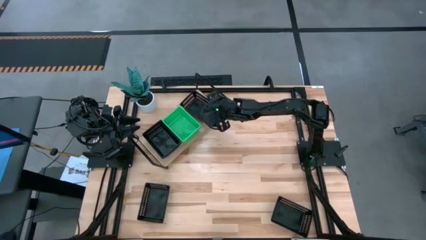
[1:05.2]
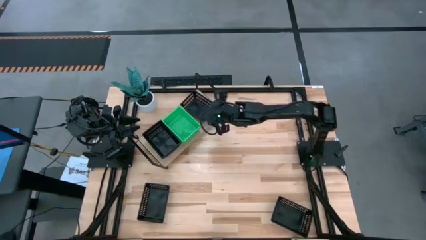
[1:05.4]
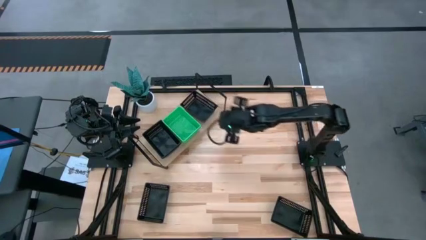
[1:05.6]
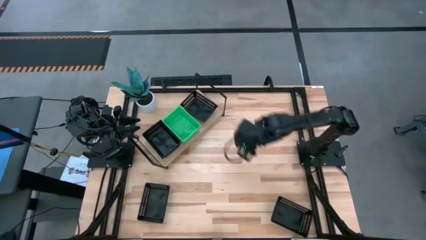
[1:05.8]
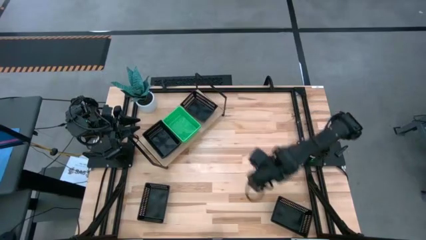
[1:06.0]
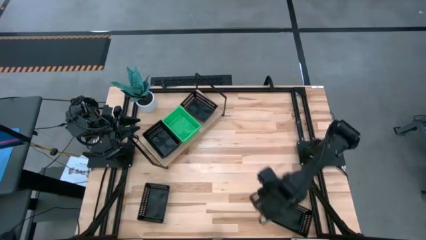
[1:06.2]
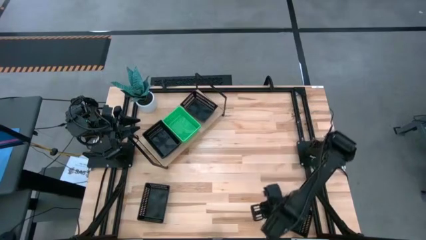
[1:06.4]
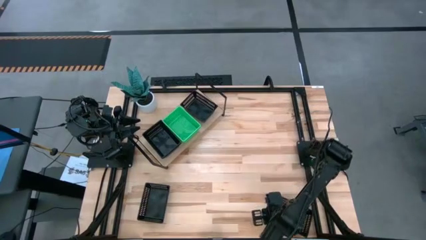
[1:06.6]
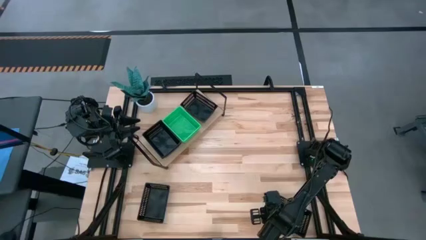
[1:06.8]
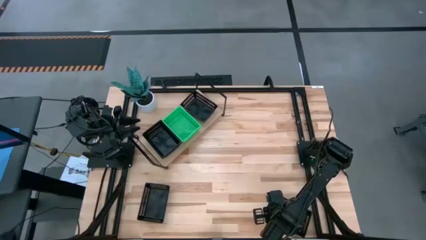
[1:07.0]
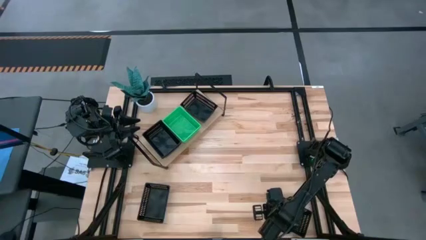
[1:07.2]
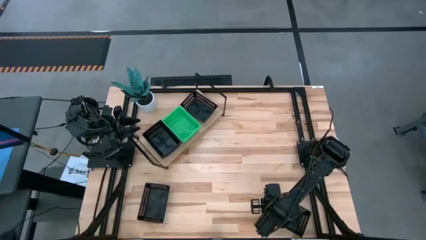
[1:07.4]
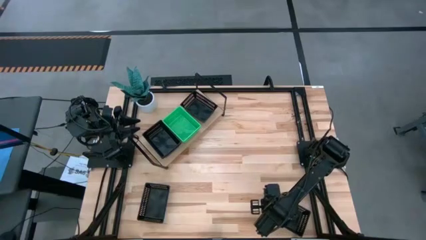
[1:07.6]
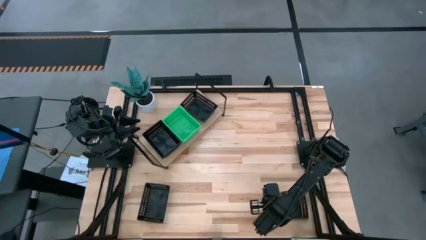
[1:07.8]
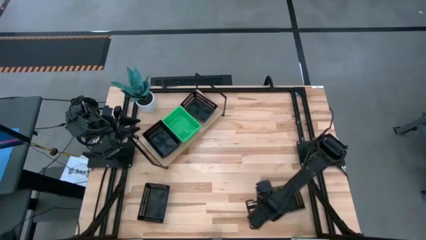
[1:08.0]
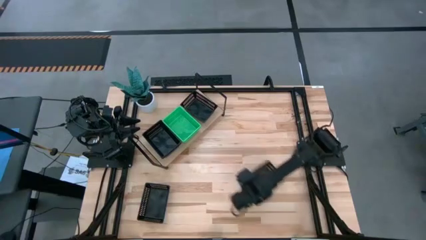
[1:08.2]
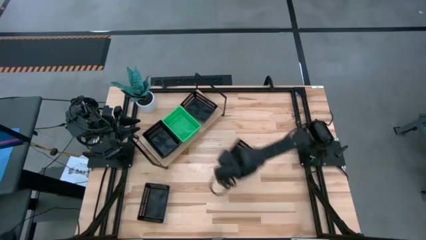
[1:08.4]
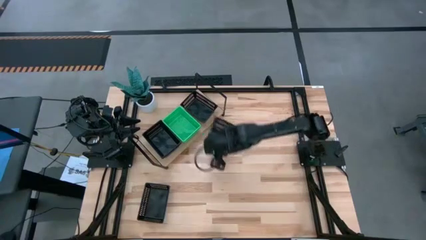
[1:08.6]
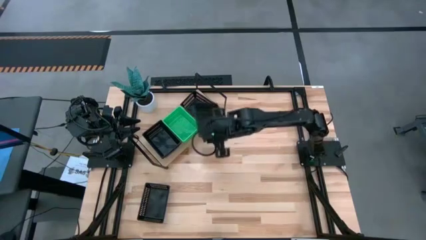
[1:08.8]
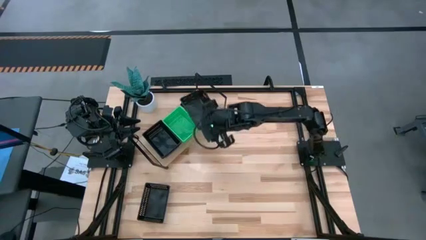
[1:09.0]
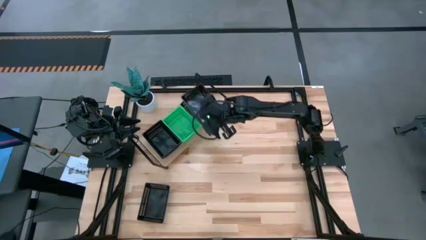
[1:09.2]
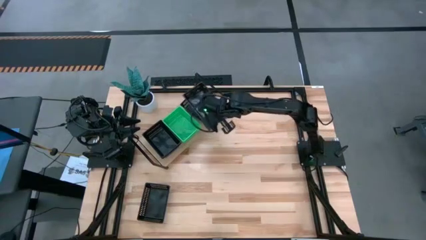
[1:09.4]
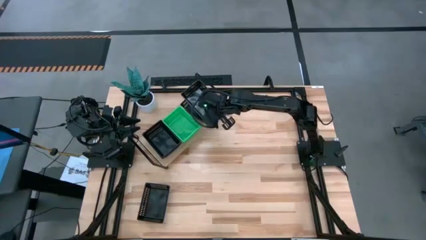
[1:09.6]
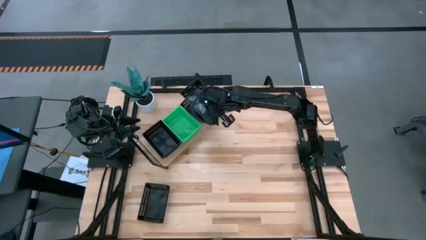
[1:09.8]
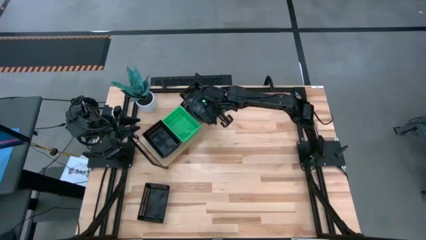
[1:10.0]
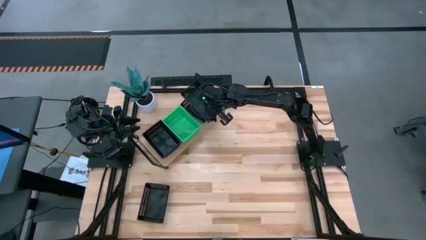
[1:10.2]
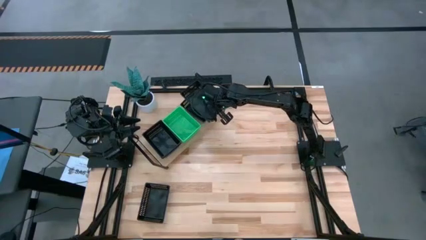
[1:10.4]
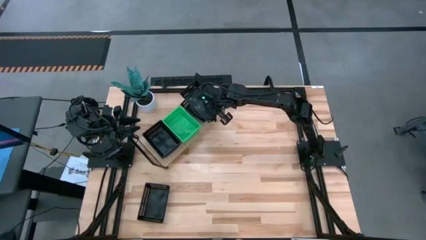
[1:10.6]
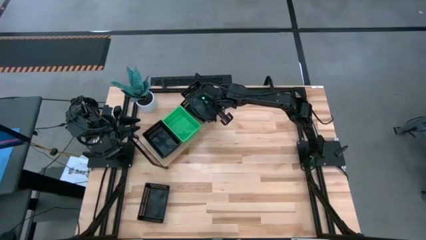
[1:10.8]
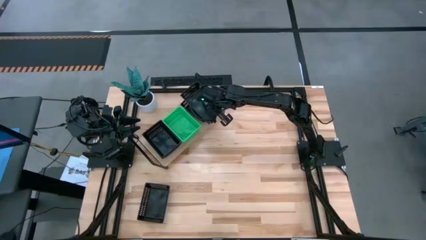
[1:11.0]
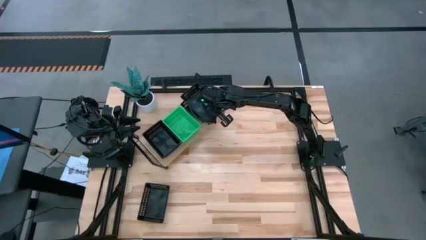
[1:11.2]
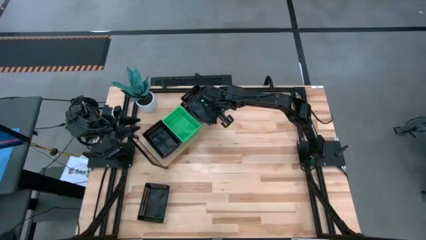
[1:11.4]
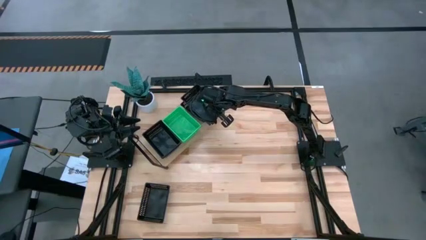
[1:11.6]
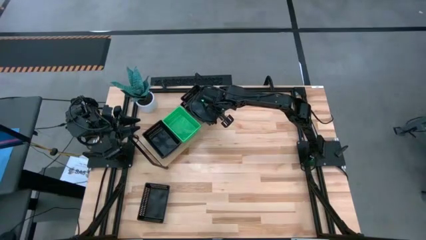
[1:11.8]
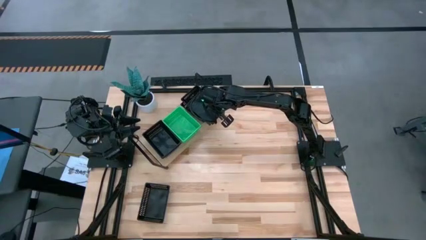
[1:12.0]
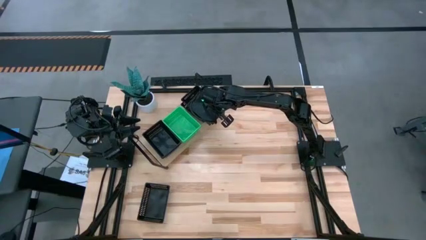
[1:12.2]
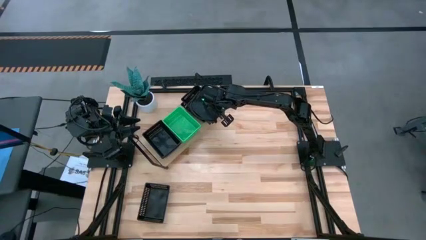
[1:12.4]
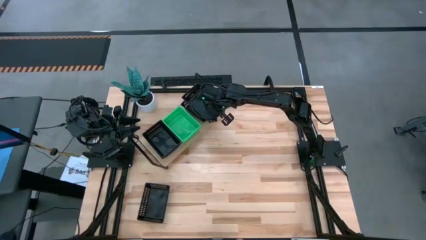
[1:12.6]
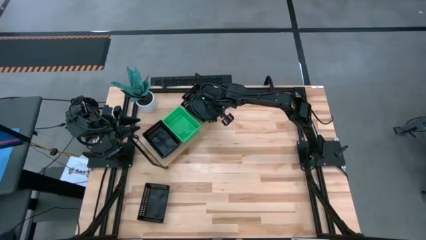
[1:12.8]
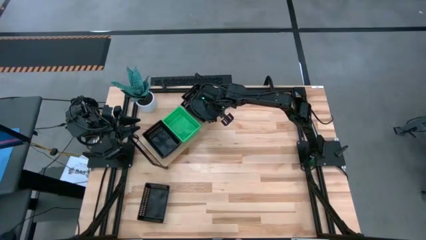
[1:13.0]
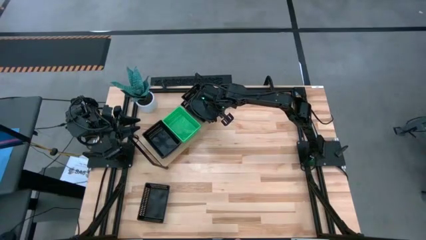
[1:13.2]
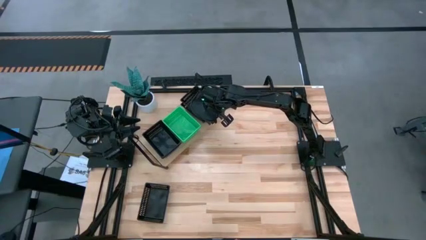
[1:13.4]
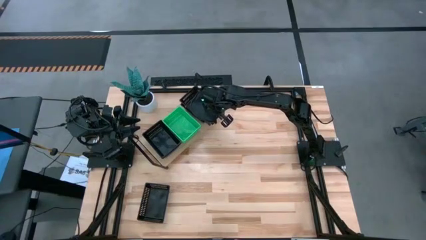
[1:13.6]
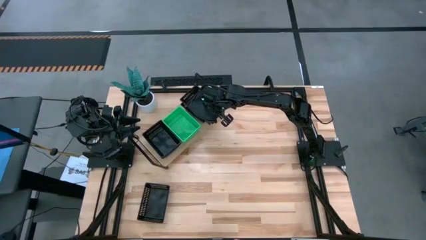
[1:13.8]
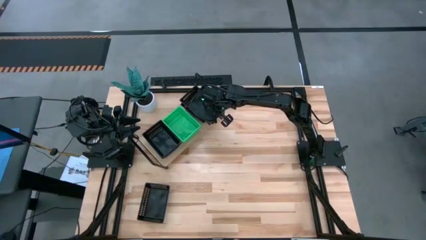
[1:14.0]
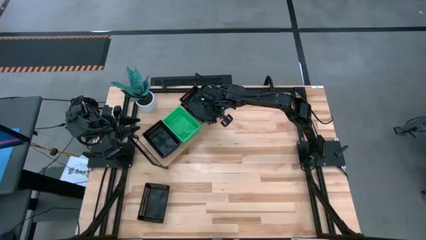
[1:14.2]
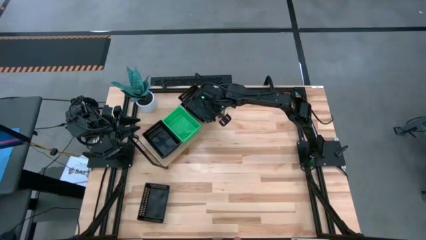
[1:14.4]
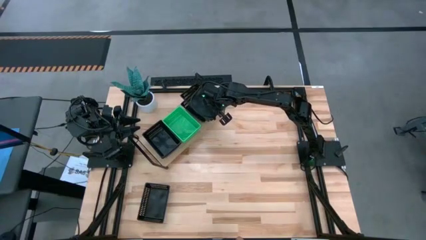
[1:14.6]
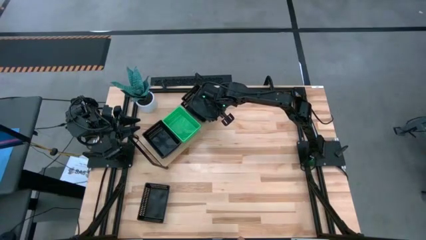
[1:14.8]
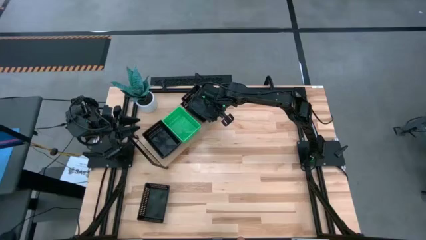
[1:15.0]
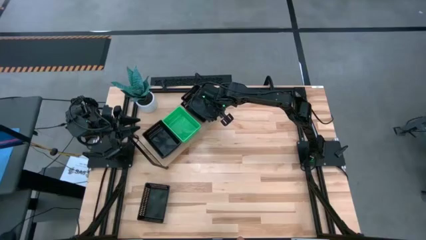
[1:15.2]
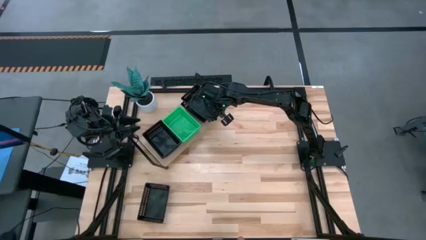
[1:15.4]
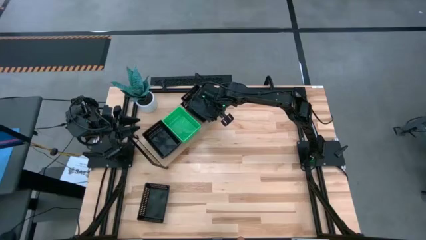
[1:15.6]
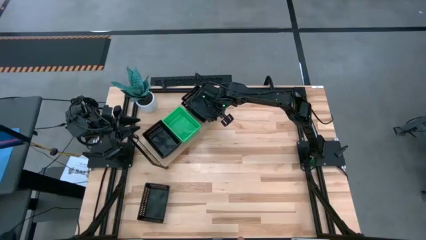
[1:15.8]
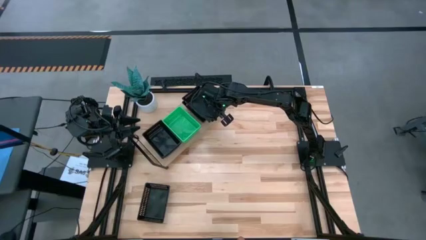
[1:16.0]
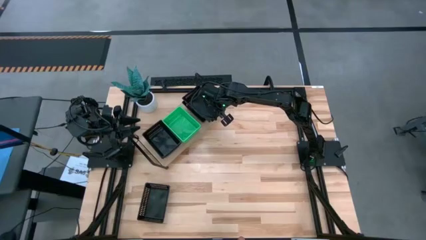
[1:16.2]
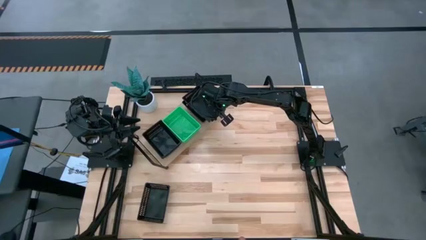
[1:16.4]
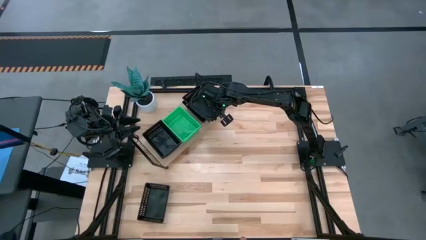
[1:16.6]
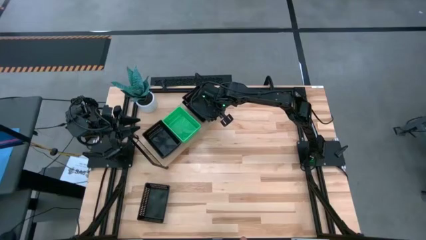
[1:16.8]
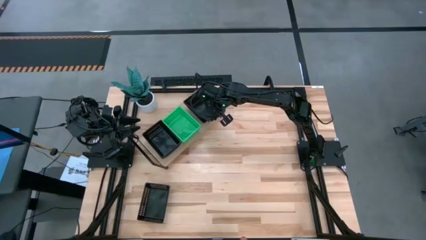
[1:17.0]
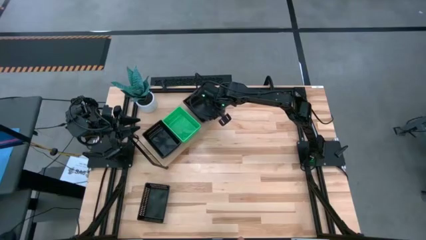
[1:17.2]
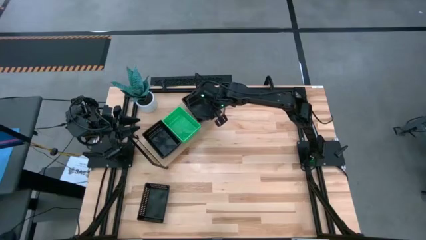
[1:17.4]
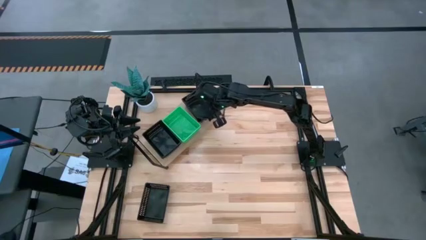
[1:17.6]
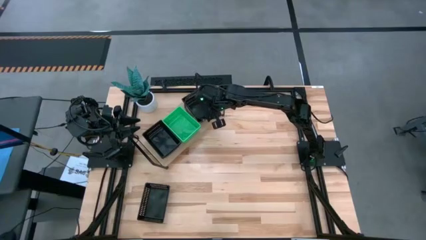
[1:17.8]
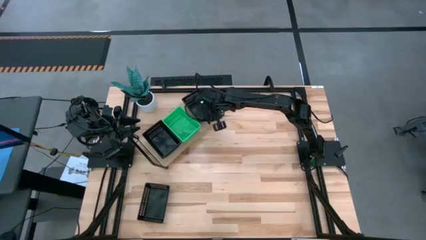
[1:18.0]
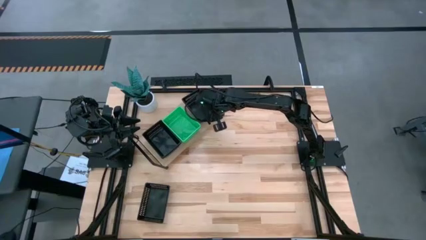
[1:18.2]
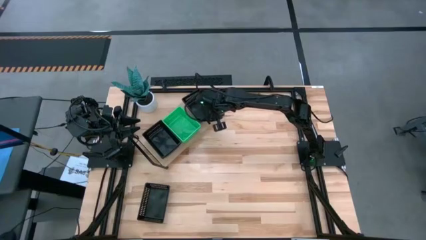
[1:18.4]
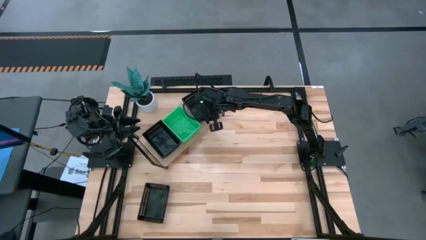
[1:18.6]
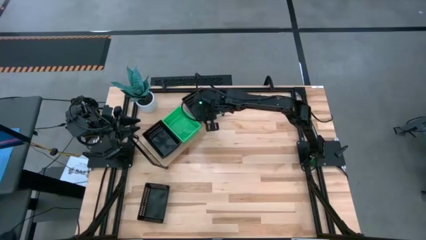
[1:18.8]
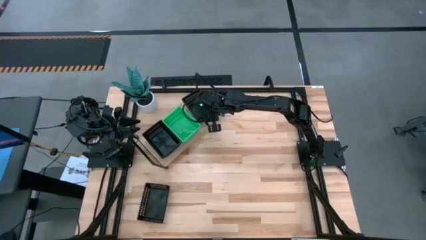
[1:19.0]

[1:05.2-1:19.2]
Task: Stack baskets on shelf by color
Stack the black bin on the top of the right black bin on the shelf

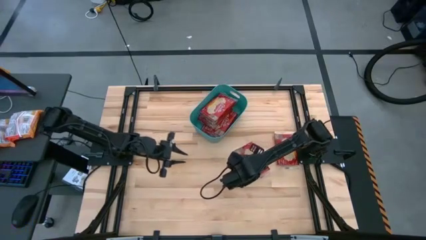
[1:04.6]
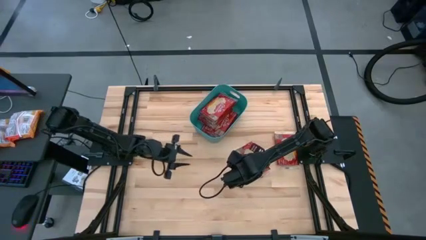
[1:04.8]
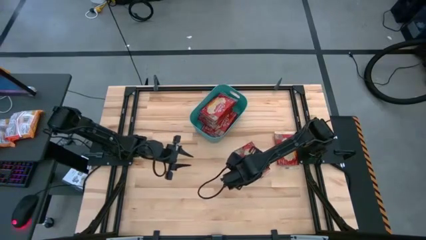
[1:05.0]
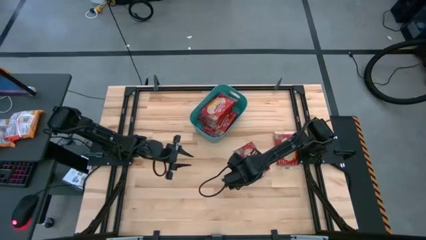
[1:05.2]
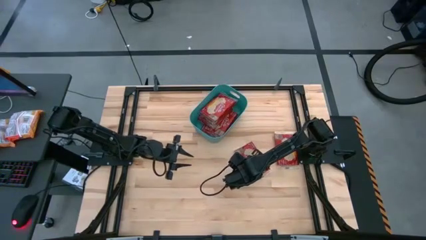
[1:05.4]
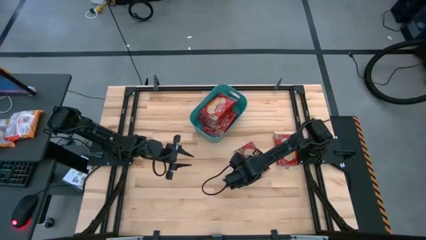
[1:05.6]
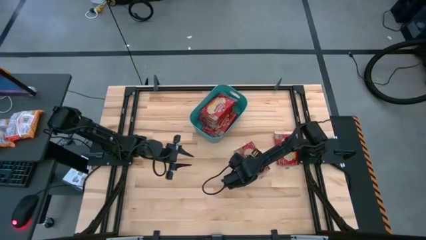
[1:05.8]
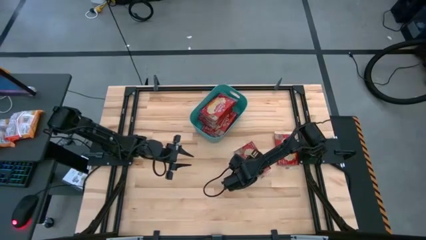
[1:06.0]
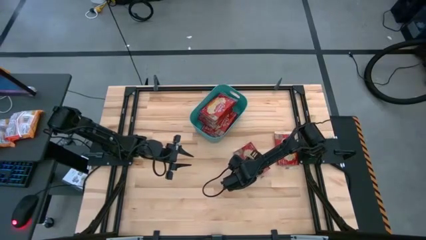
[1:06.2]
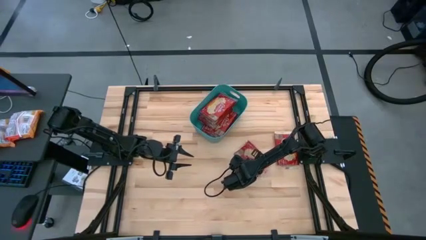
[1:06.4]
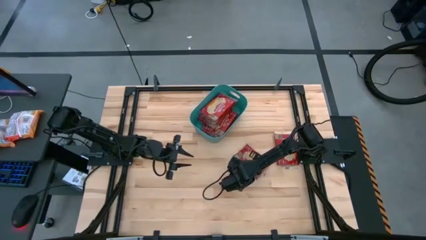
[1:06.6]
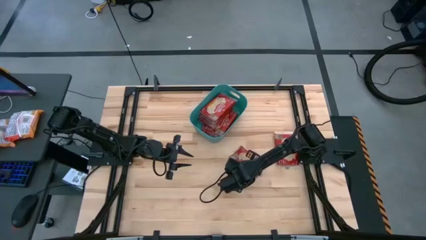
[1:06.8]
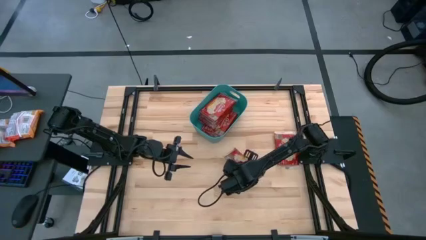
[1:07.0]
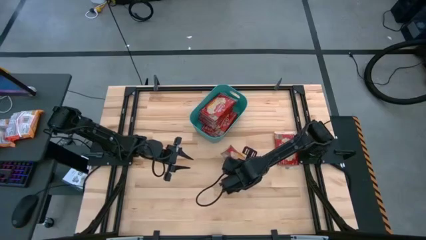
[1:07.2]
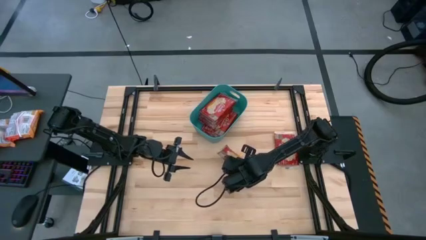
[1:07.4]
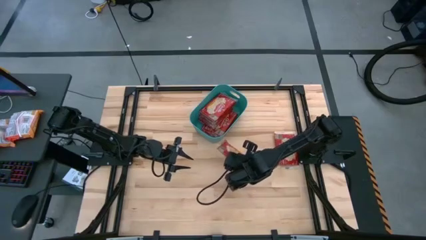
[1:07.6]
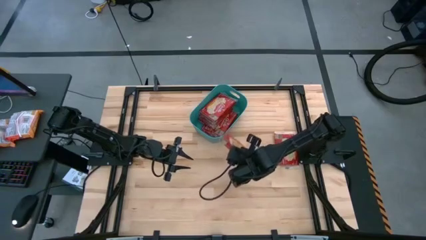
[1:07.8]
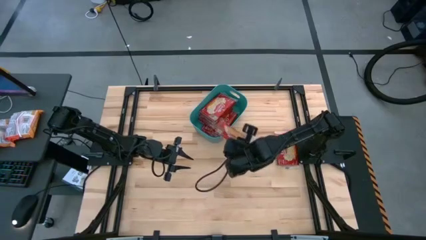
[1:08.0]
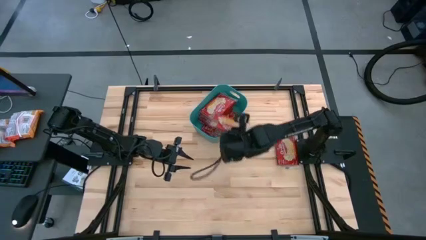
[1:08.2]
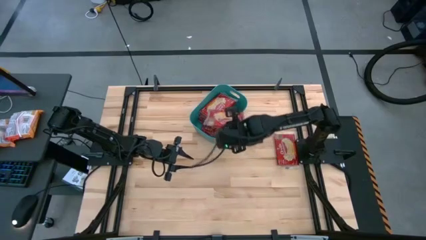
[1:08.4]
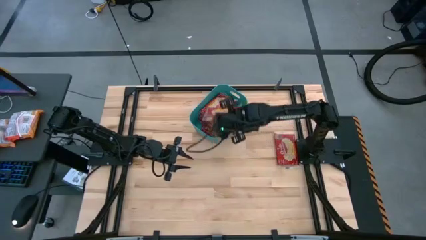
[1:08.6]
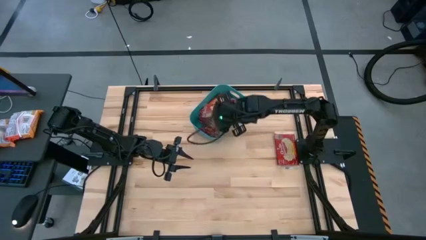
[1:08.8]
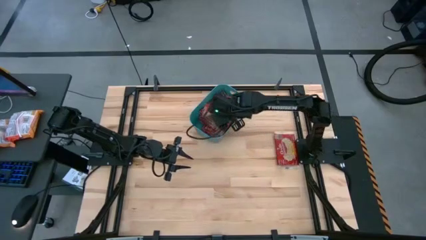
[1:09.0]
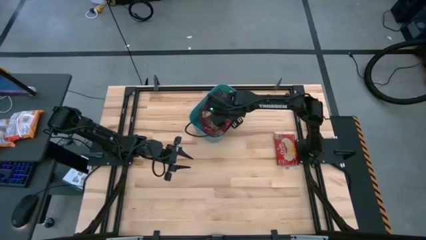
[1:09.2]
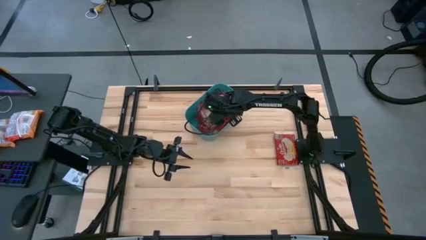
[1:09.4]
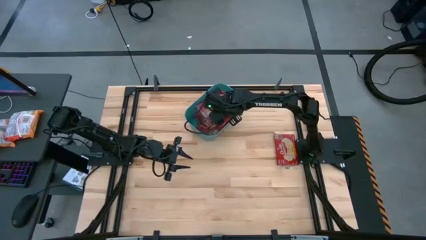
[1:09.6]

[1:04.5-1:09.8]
Task: Sort popcorn bags into baskets
Put the popcorn pack into the blue bin
